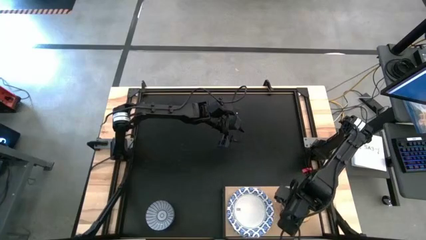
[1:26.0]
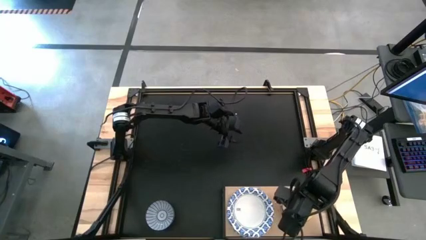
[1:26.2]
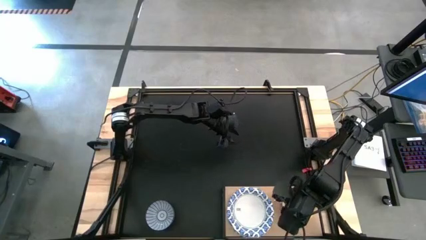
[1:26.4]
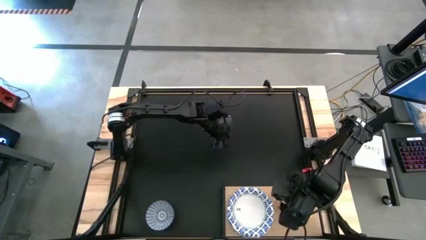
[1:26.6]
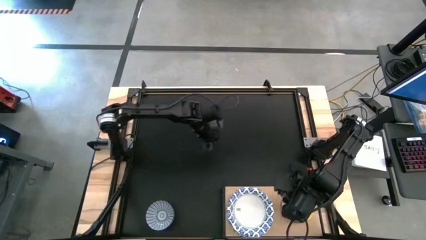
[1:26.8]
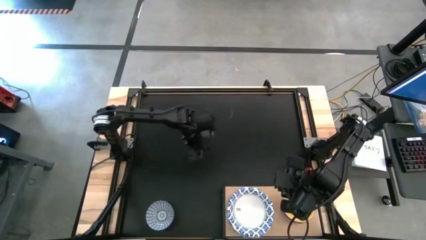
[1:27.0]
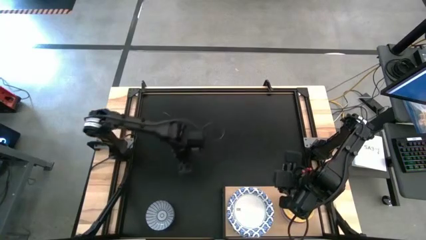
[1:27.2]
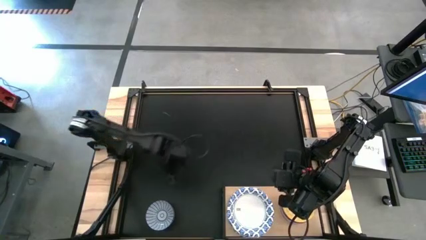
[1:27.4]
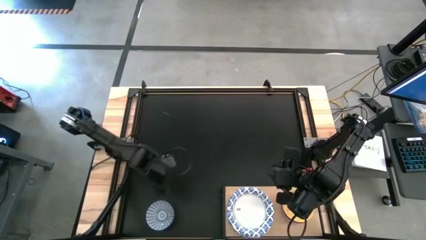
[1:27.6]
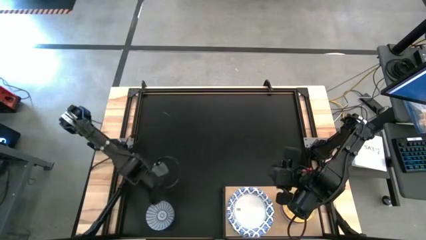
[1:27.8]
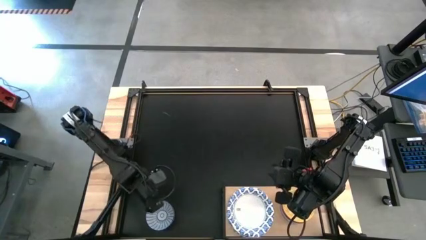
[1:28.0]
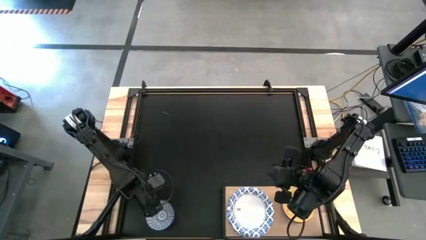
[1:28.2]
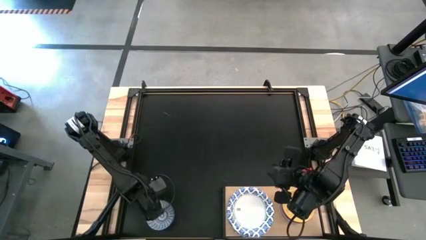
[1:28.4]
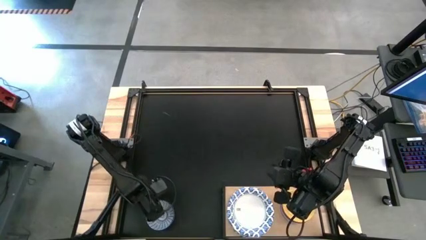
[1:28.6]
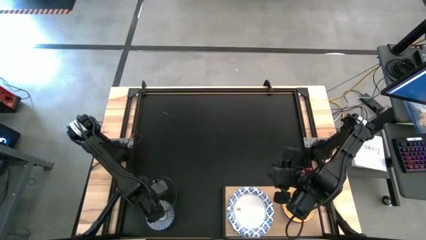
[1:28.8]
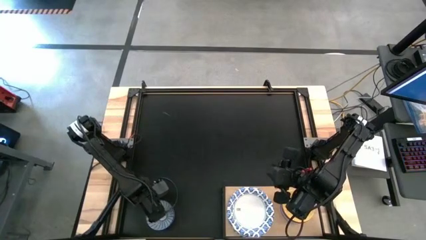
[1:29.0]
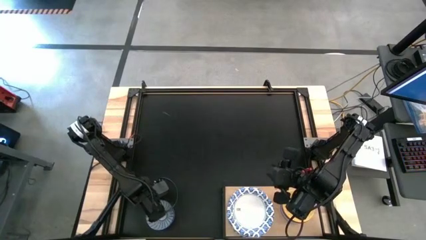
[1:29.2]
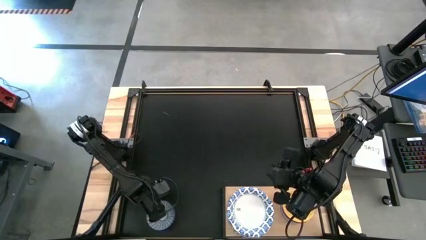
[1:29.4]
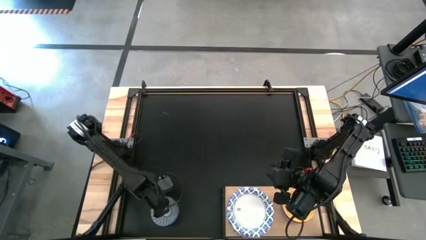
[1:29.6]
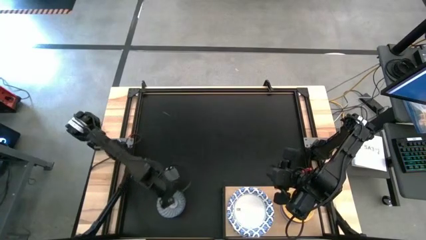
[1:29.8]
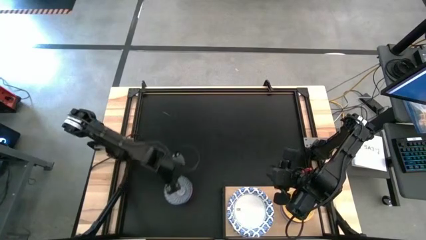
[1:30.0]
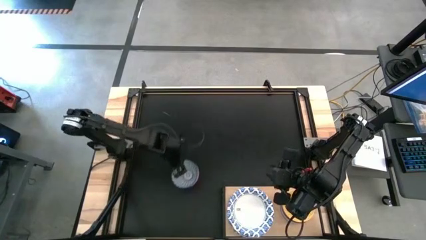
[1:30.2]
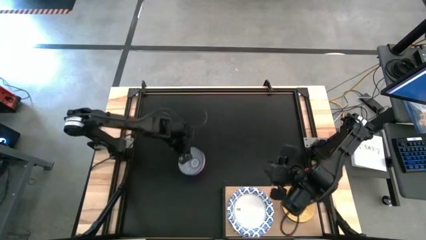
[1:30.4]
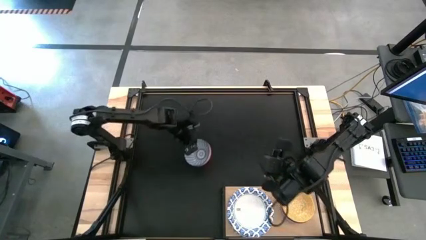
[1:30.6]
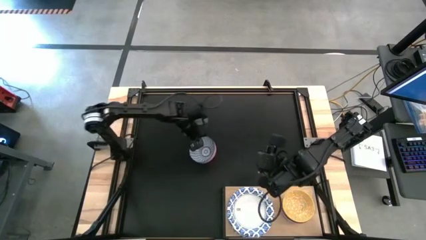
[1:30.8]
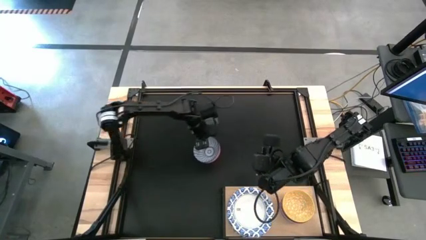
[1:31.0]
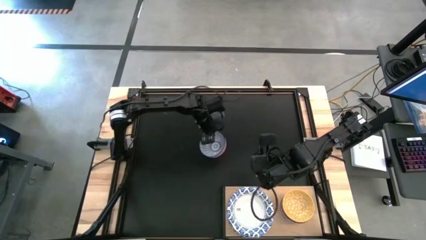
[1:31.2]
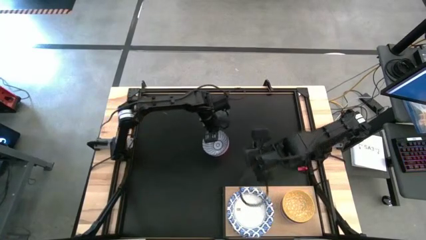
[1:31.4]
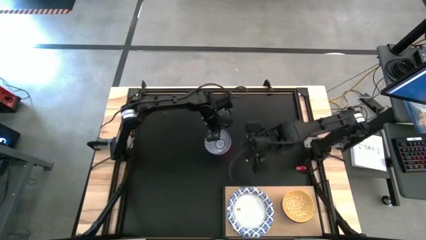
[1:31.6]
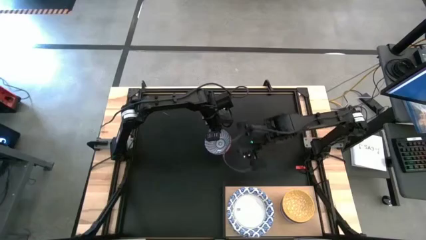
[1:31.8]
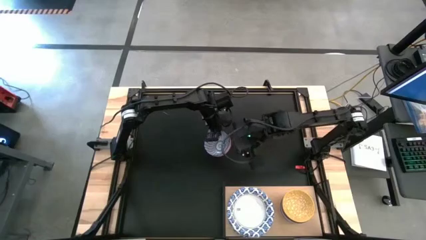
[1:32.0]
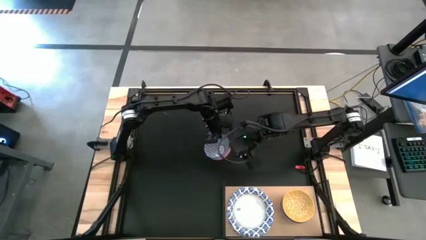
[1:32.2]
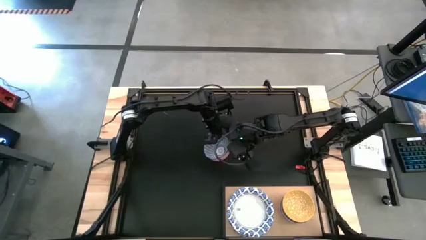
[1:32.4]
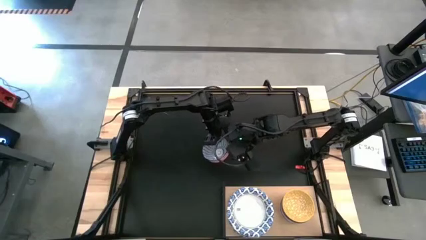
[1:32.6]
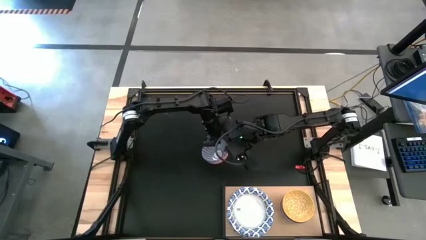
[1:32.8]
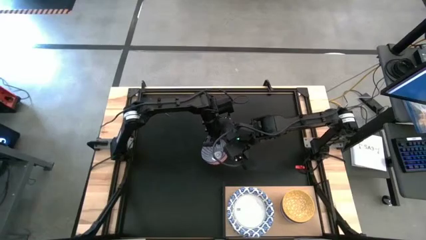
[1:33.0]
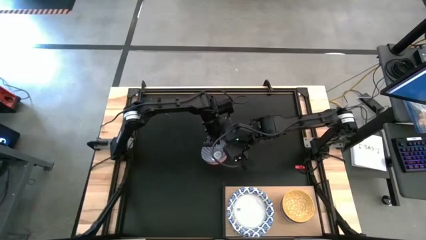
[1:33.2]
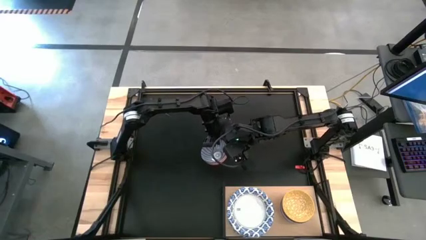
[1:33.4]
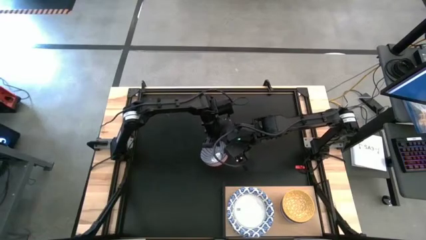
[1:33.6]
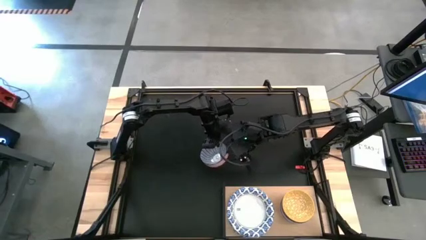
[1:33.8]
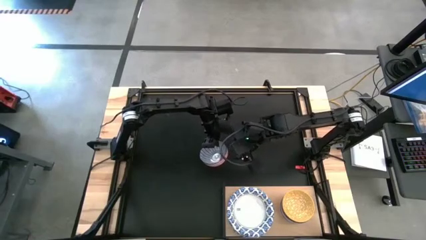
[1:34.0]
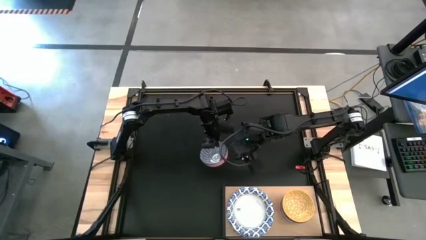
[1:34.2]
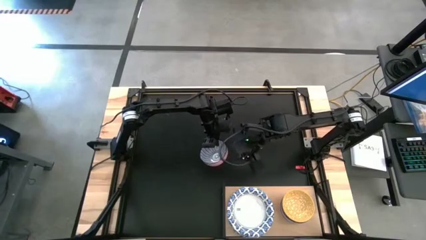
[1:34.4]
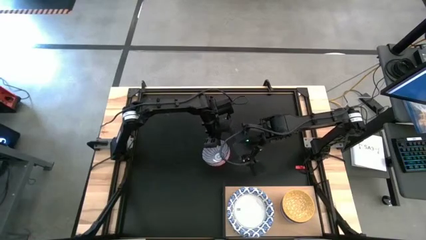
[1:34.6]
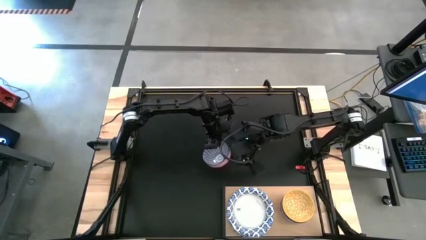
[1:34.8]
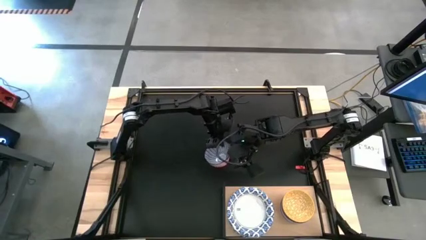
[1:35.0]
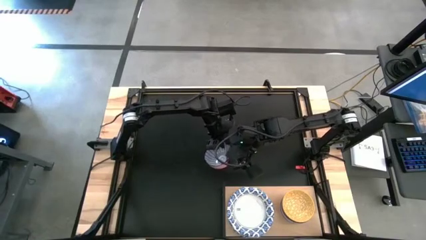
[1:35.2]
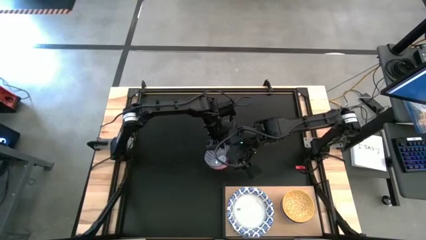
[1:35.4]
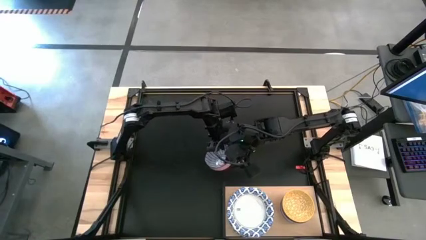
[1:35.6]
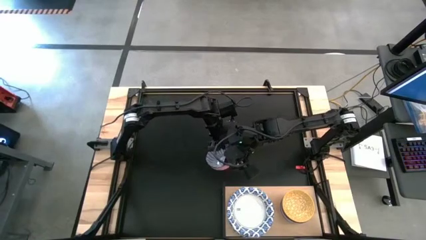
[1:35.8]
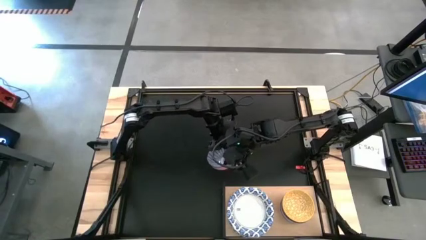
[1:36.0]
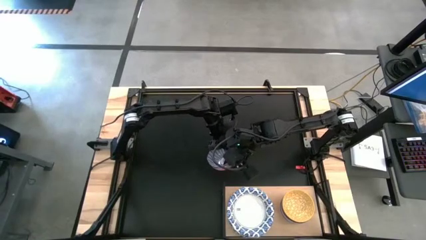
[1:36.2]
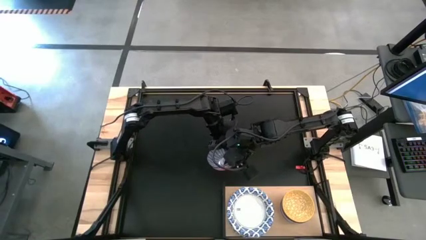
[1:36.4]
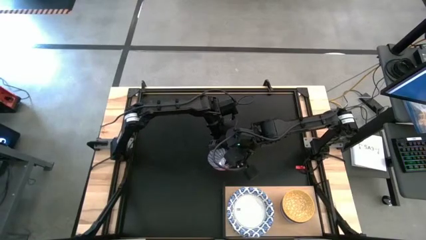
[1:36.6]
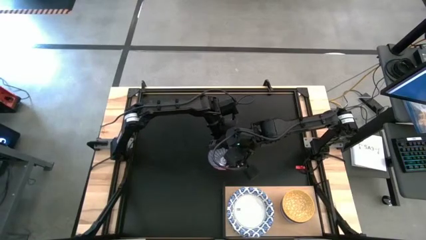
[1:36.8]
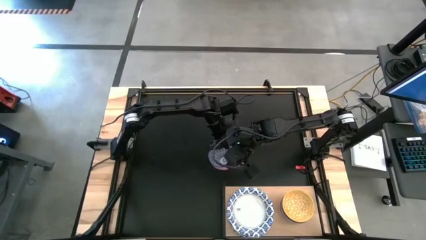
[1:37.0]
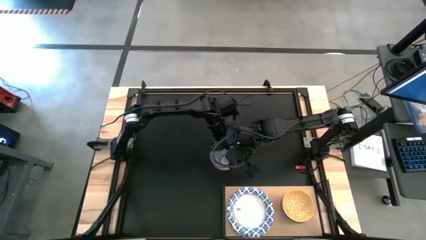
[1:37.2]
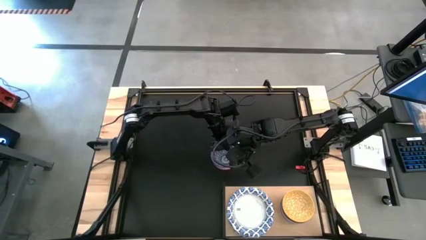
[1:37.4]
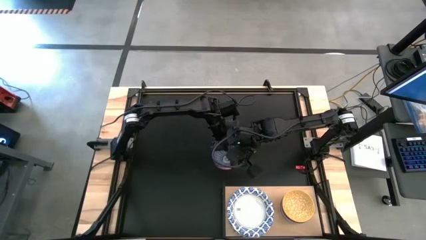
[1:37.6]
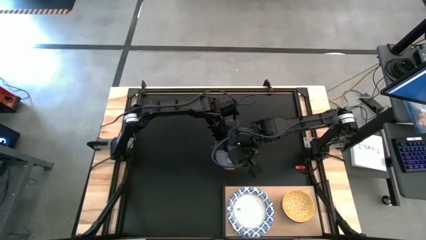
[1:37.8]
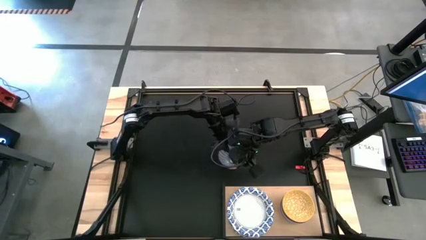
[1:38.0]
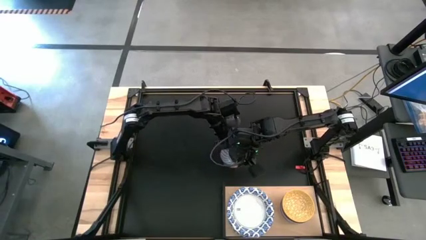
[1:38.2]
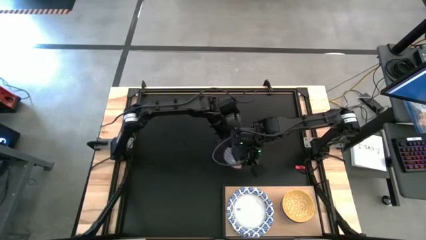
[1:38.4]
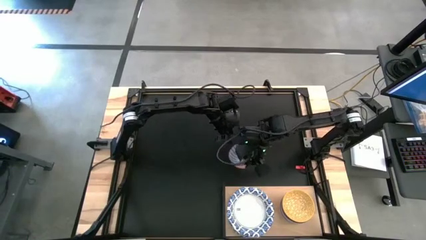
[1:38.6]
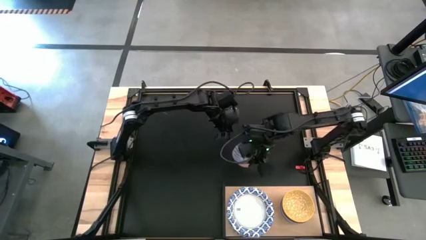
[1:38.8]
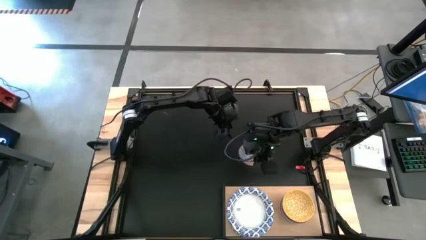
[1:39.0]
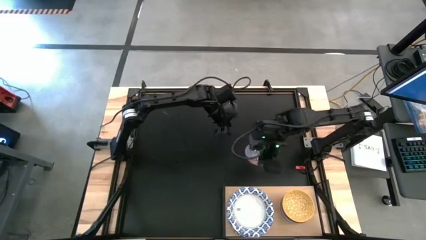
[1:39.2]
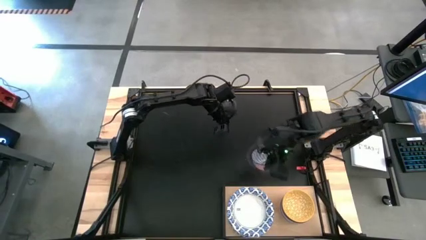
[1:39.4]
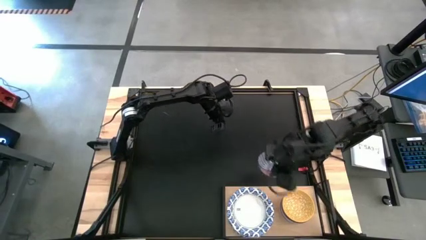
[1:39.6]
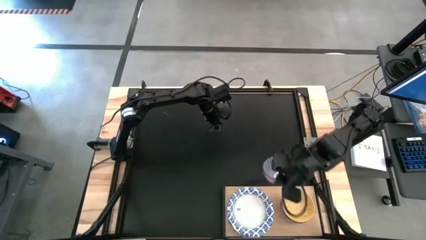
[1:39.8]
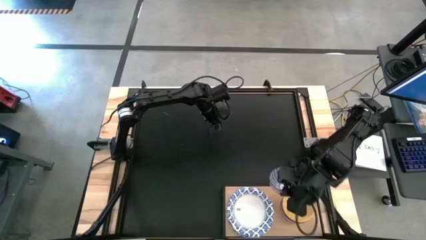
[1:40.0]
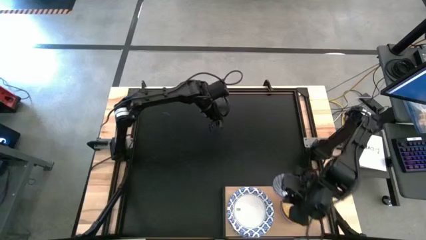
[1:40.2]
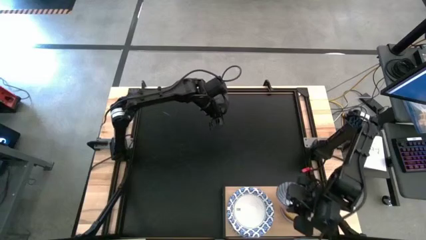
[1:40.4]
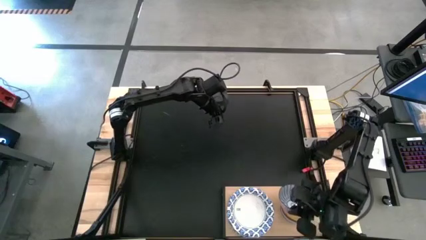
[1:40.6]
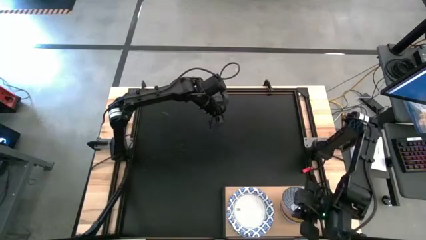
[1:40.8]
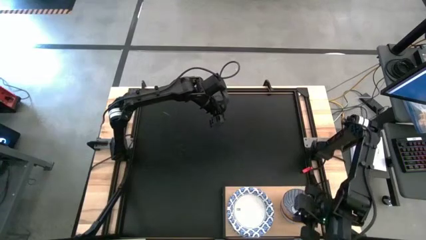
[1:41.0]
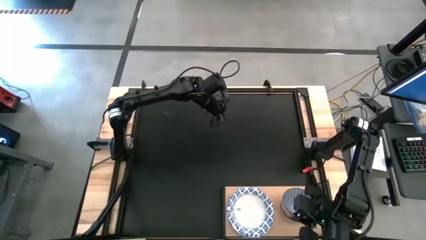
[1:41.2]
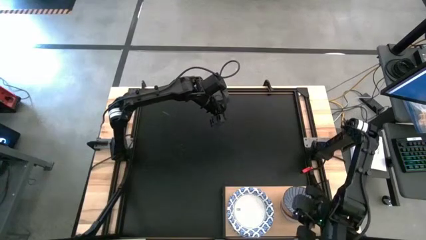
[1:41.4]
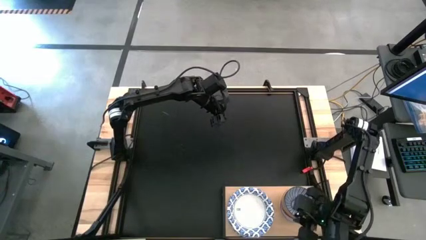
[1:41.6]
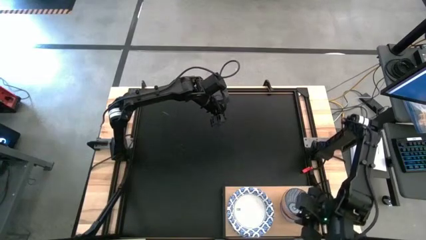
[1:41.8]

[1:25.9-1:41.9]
Task: Place and stack bowls onto a shelf
Stack the blue orange bowl on top of the yellow bowl on the shelf

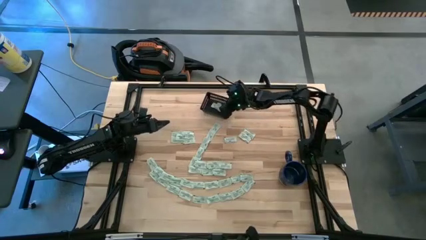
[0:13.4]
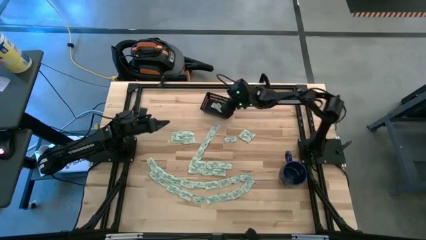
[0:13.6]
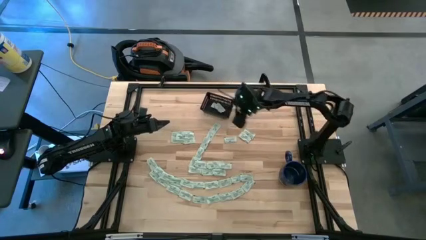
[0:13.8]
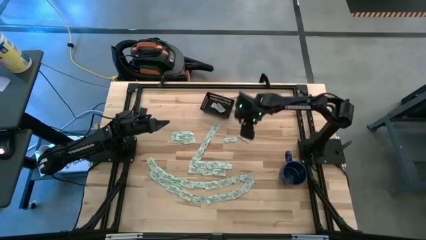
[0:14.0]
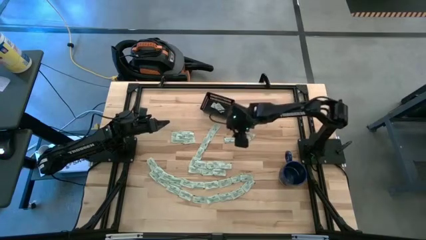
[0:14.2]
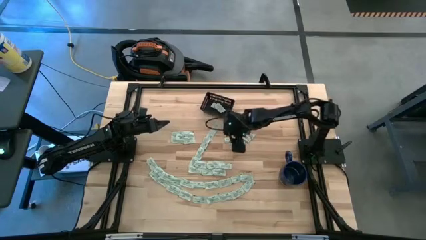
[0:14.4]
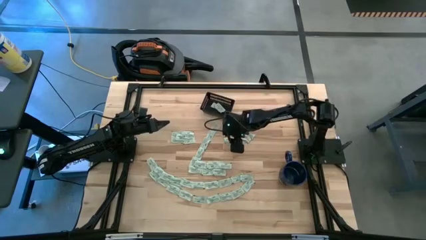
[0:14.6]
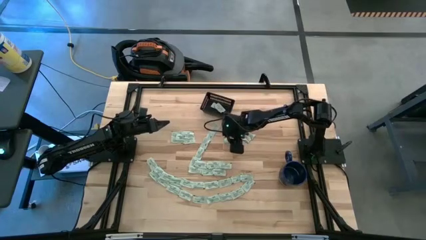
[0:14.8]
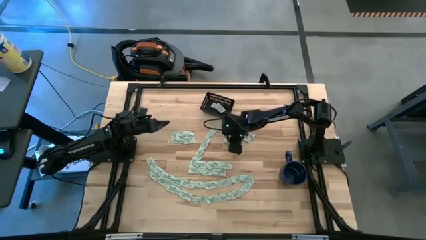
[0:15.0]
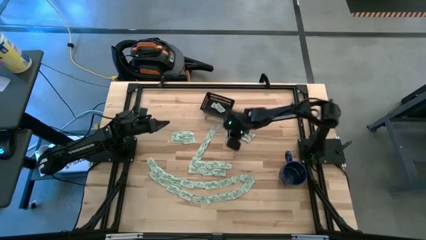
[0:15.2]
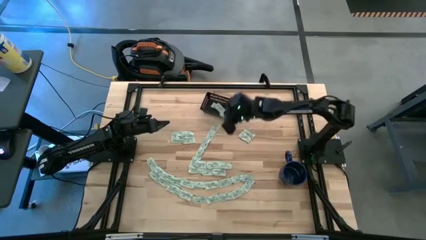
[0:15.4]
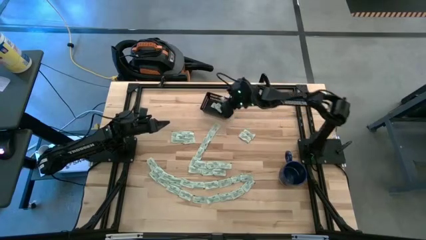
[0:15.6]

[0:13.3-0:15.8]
Task: Pick and place Stevia / Truvia into bins
Put the stevia packet into the black bin
